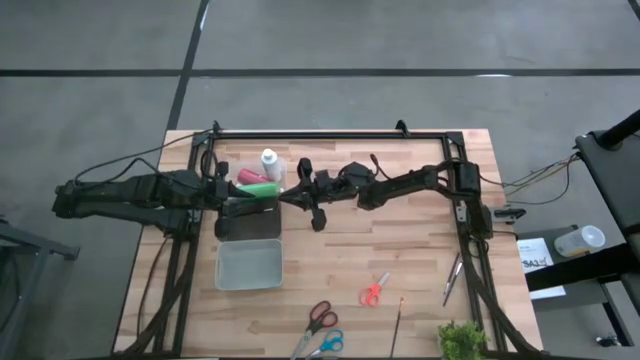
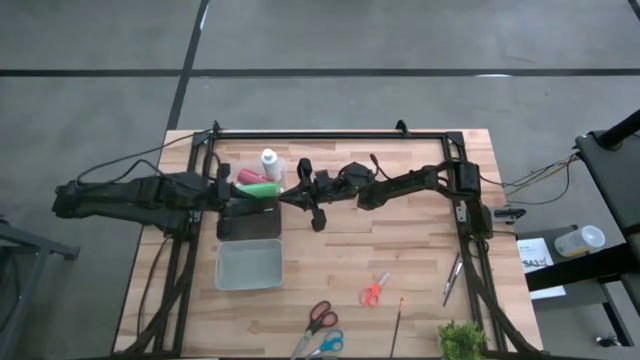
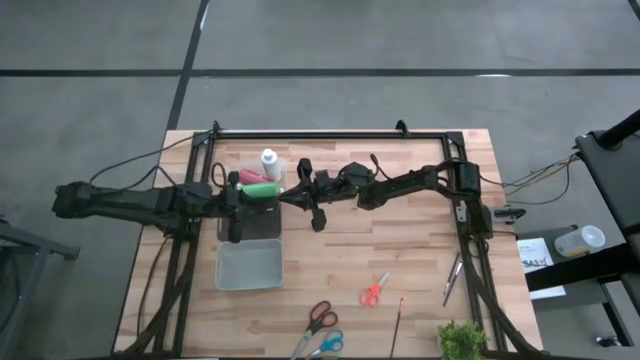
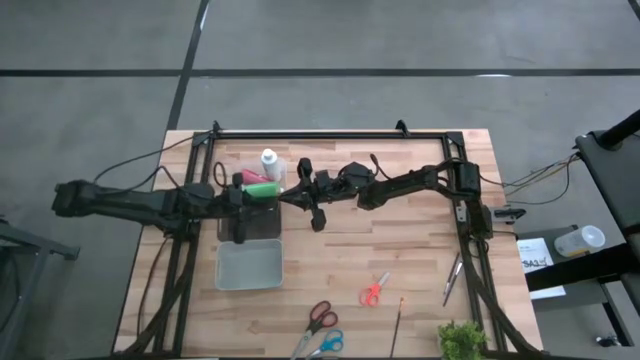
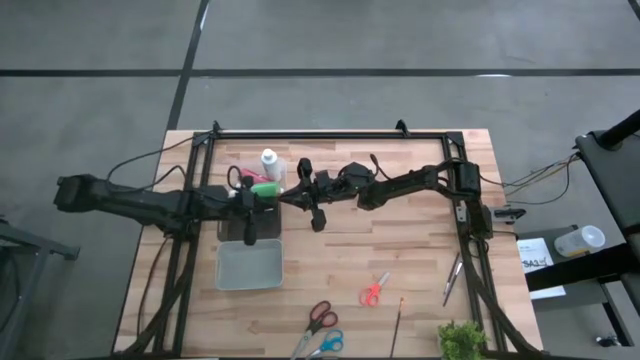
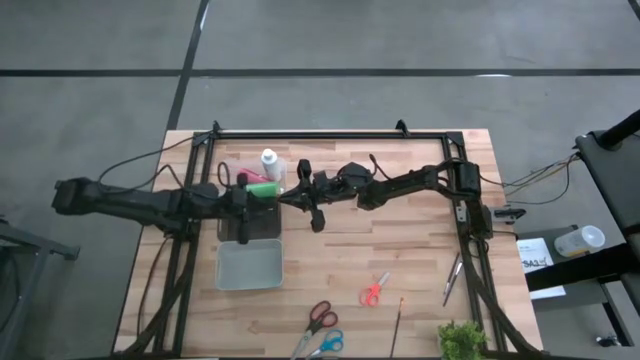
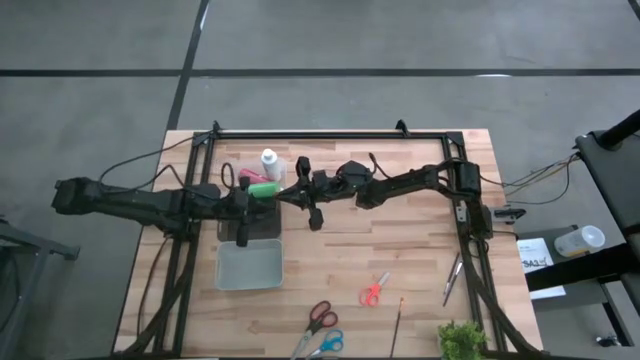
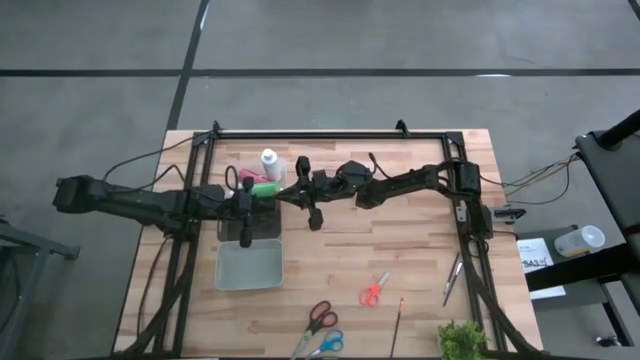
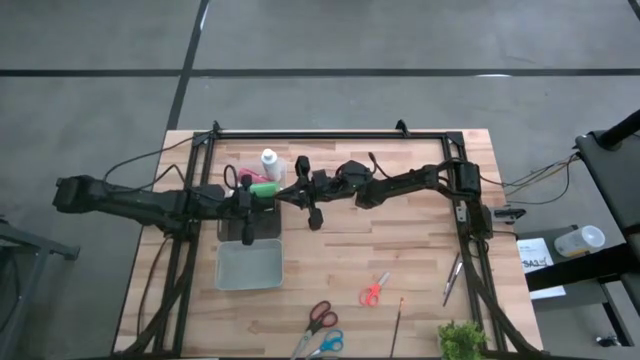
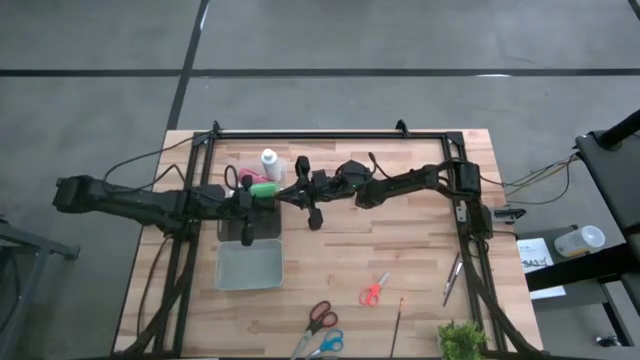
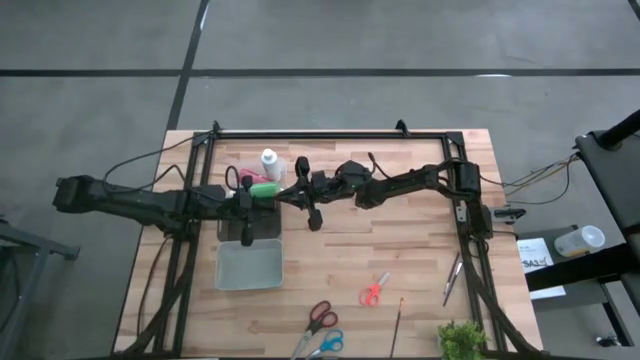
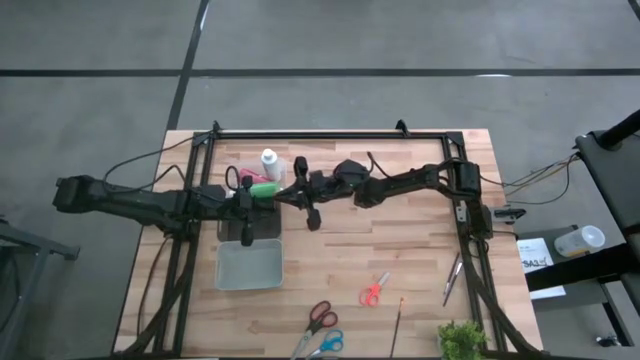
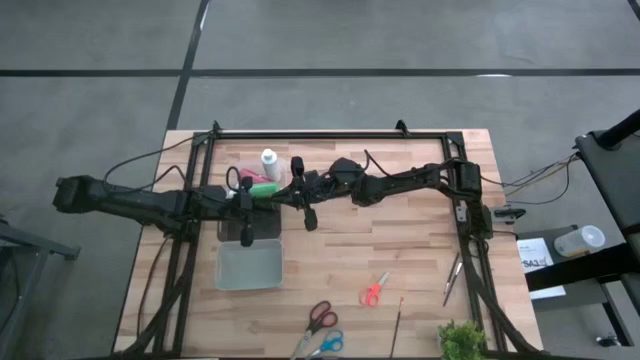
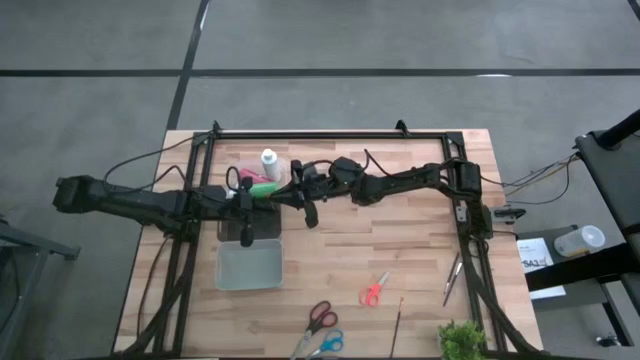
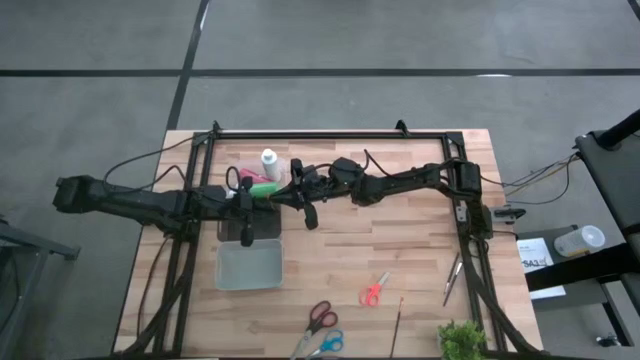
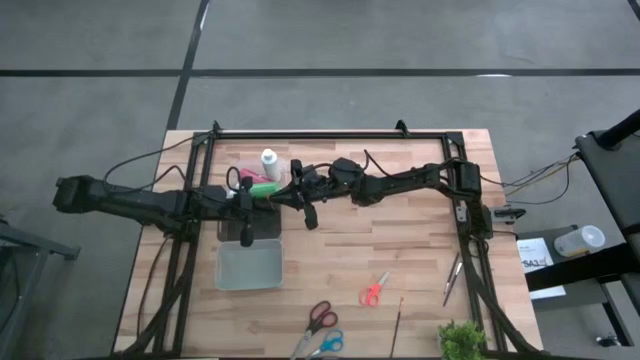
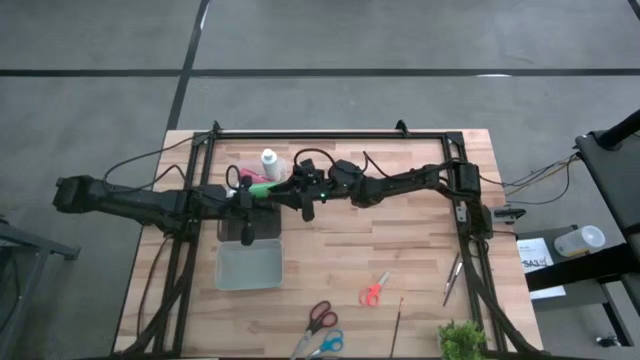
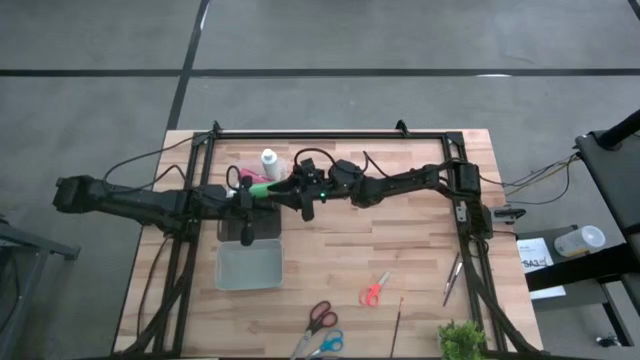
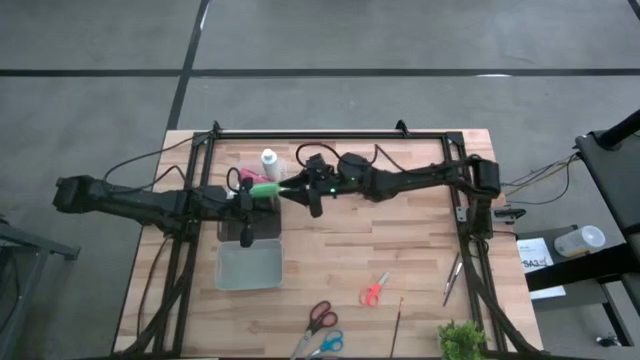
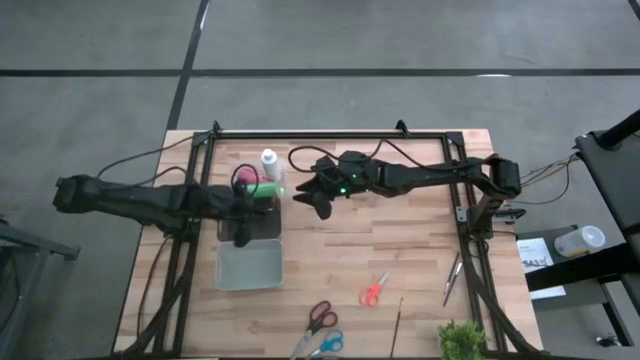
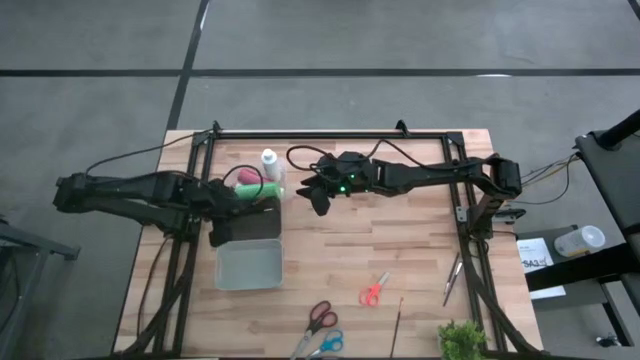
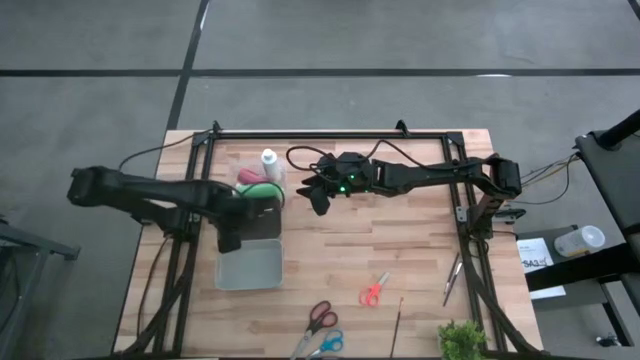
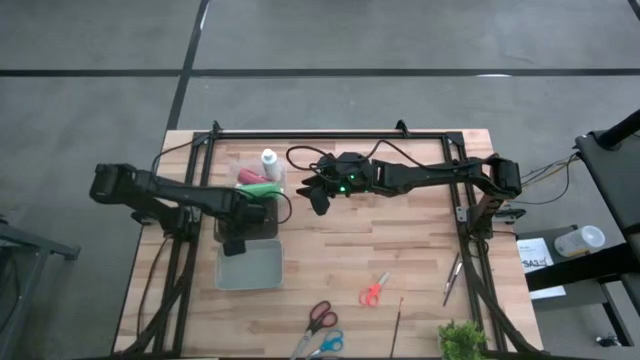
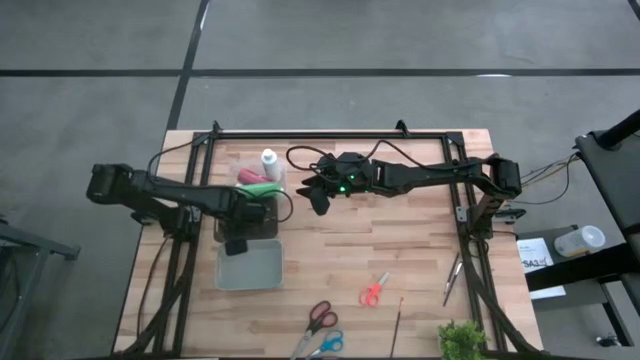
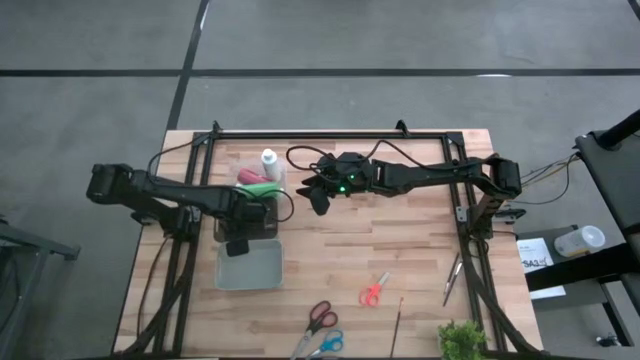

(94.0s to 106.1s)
Task: Pick & Place Paint Supplies
Put the top orange paint brush into the black bin

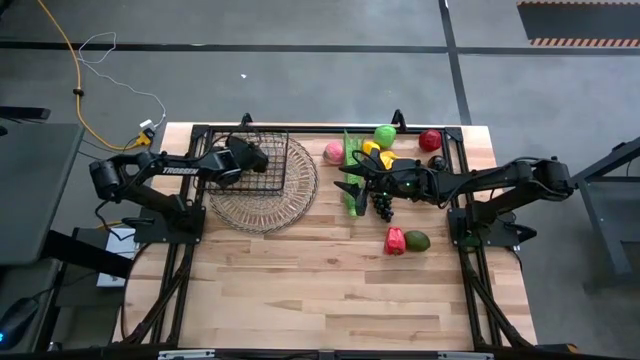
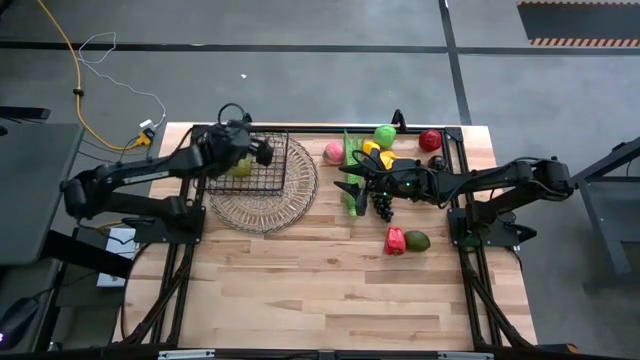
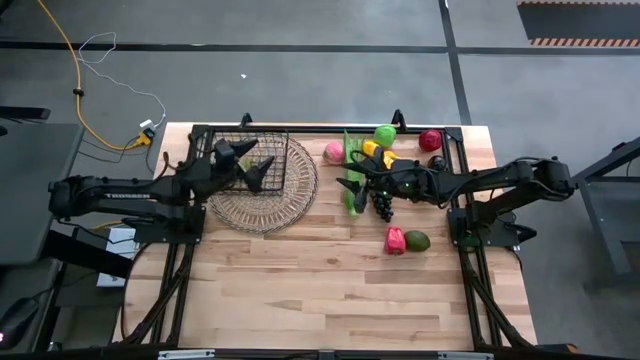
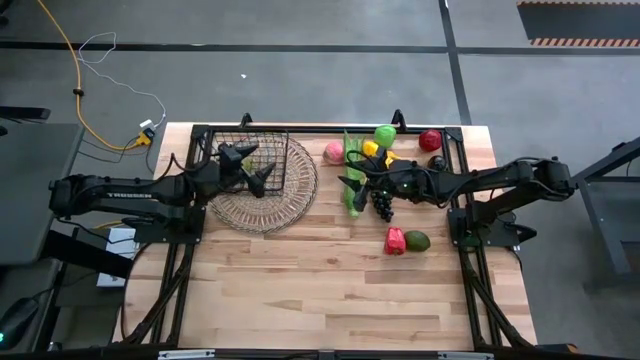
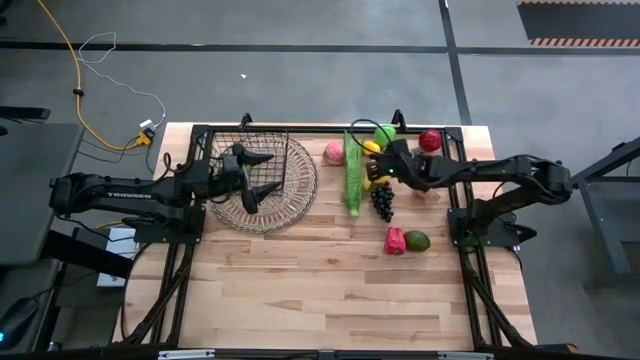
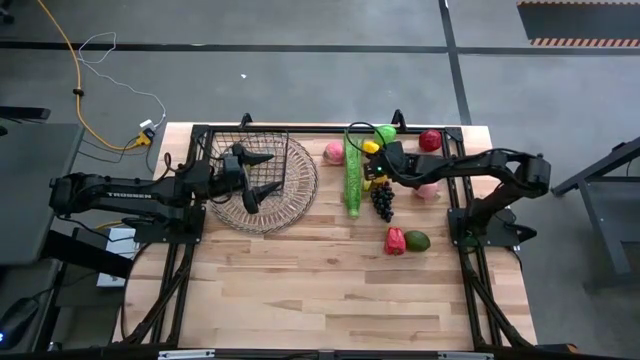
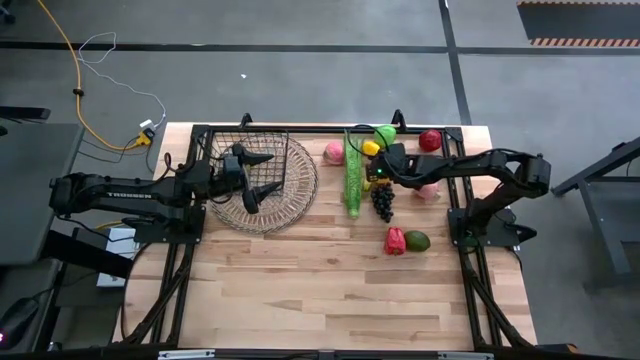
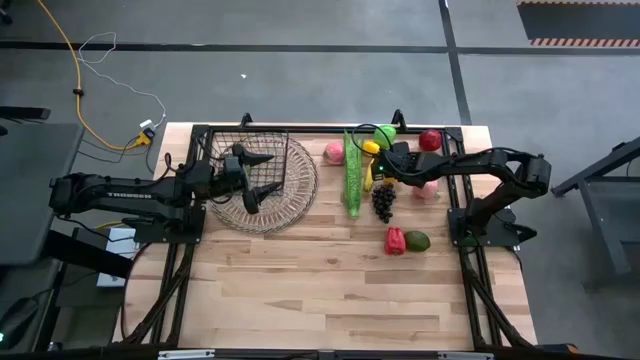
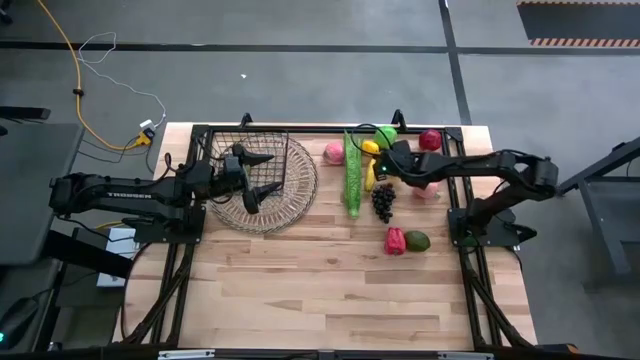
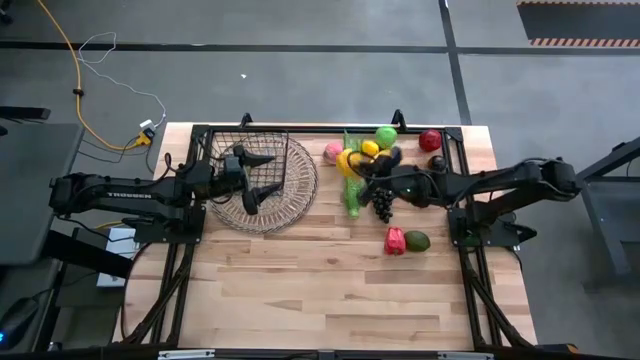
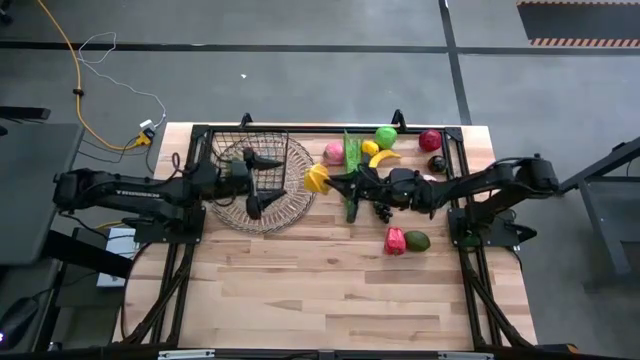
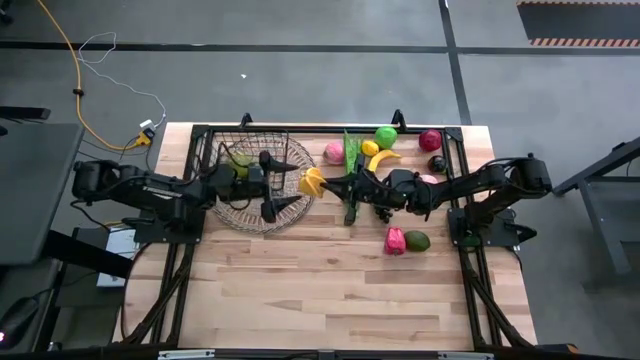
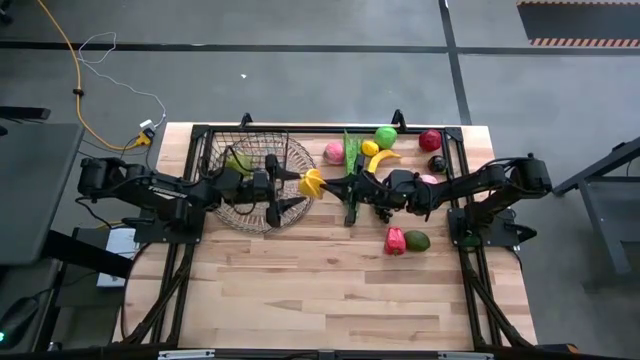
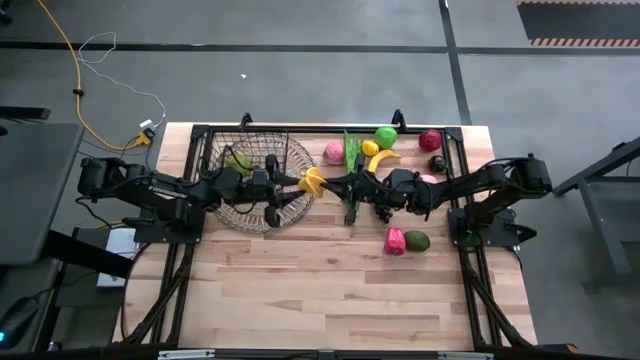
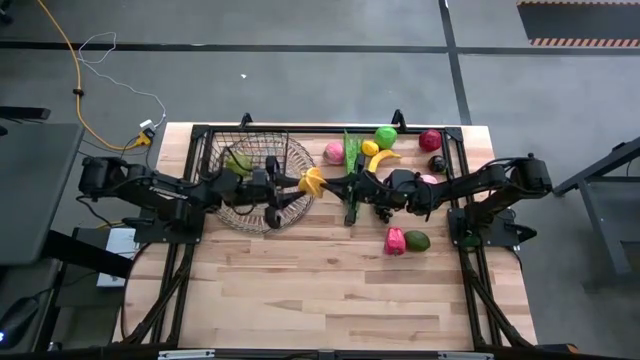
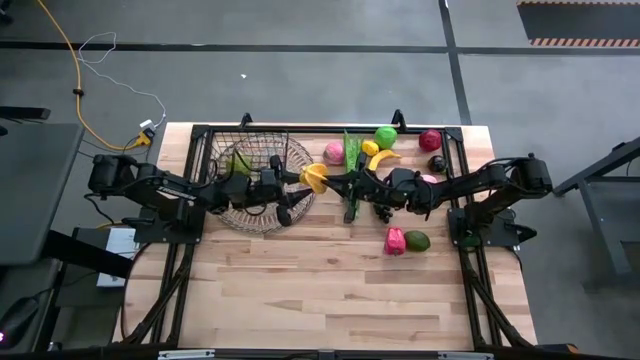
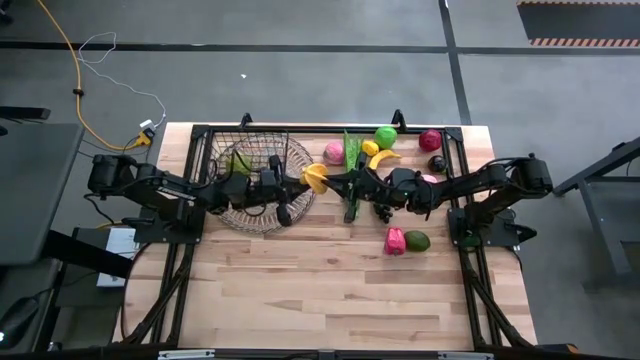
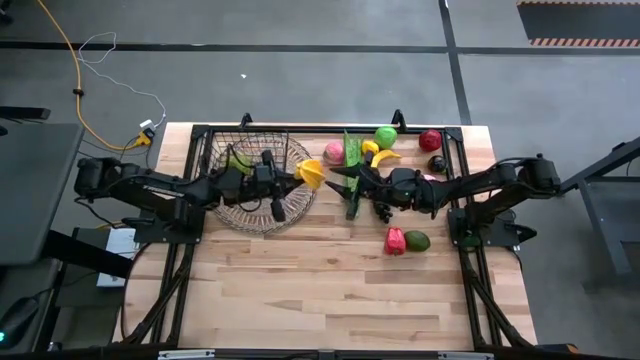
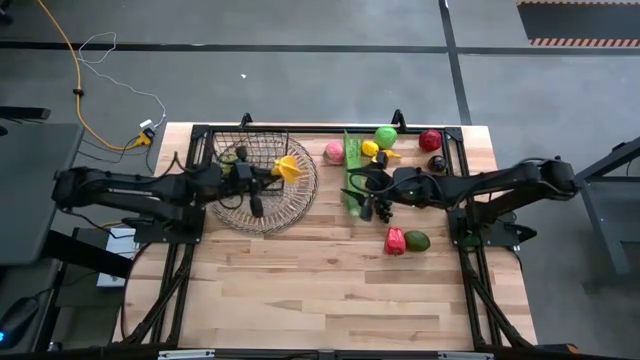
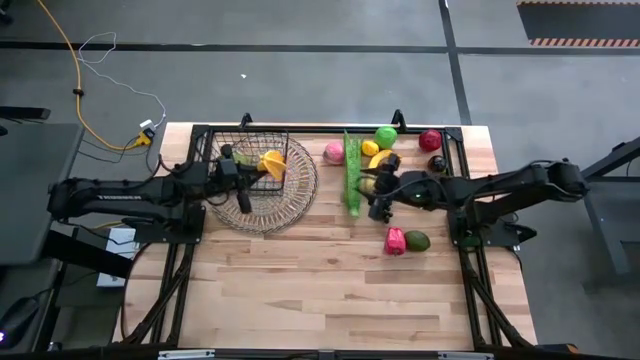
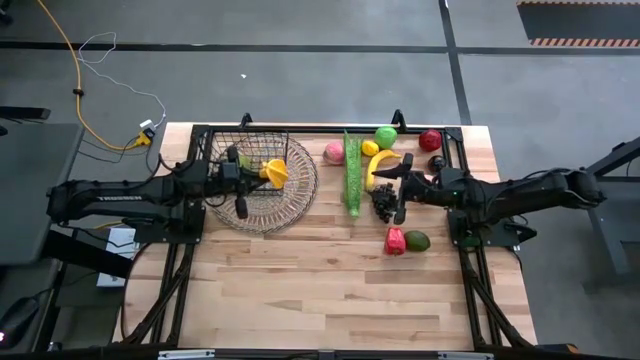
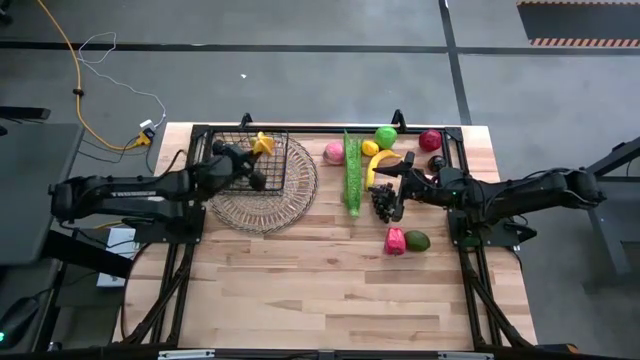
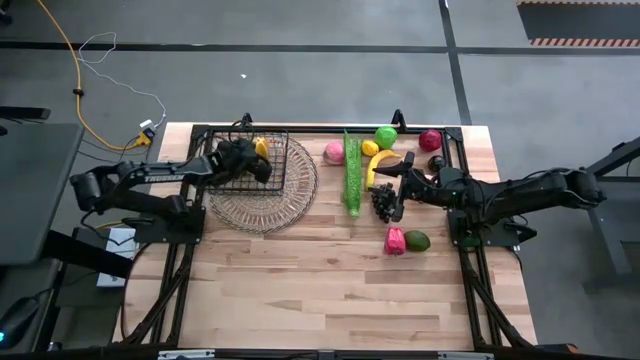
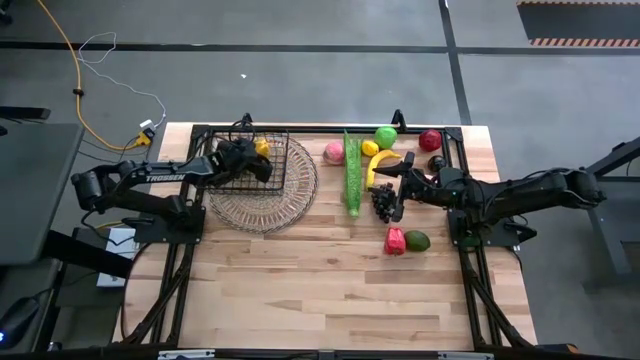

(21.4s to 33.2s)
Task: Build produce basket
Put the yellow star fruit into the black wire basket
